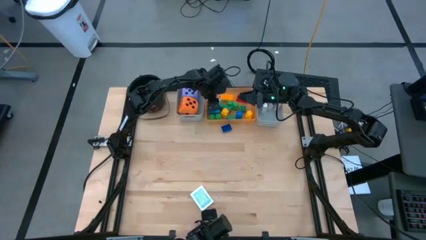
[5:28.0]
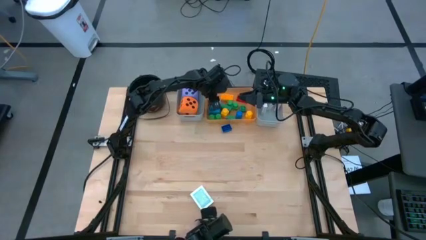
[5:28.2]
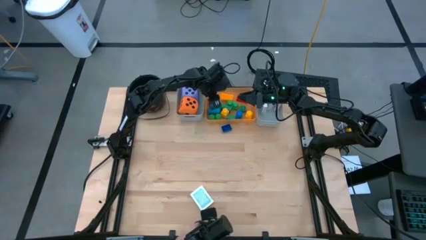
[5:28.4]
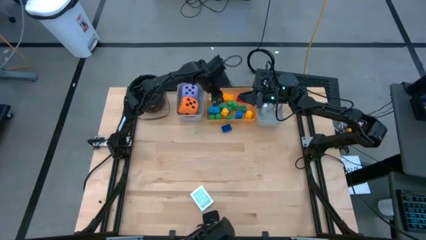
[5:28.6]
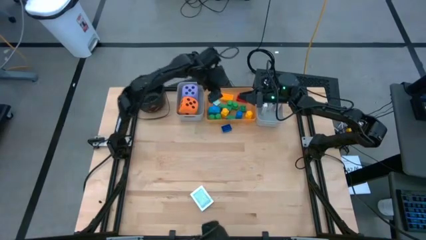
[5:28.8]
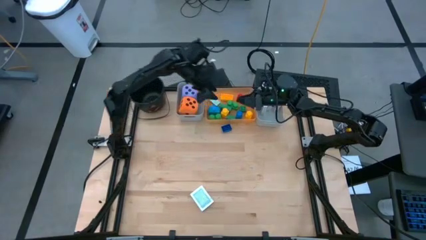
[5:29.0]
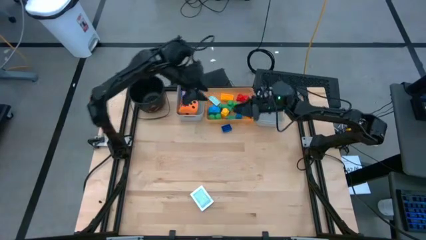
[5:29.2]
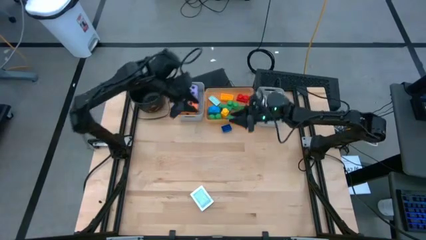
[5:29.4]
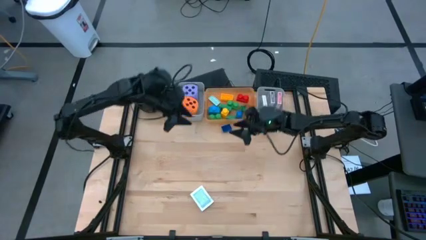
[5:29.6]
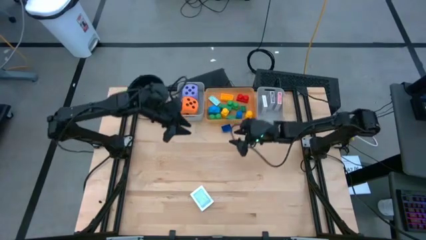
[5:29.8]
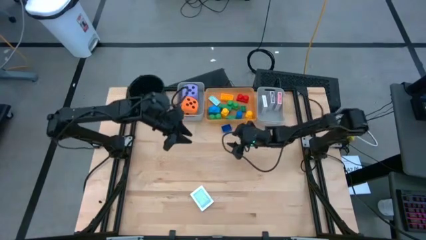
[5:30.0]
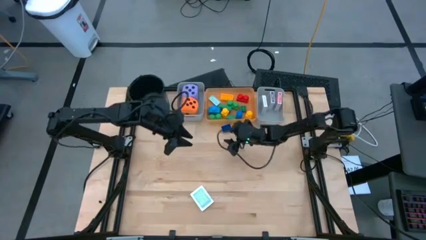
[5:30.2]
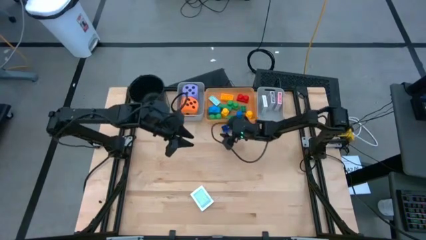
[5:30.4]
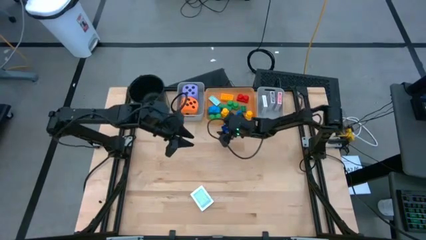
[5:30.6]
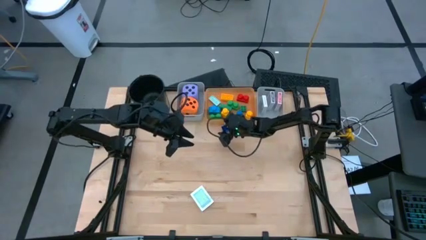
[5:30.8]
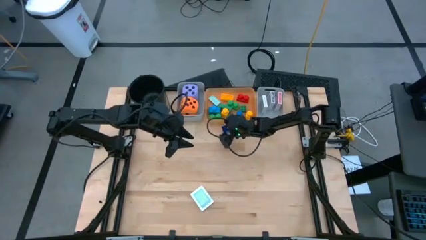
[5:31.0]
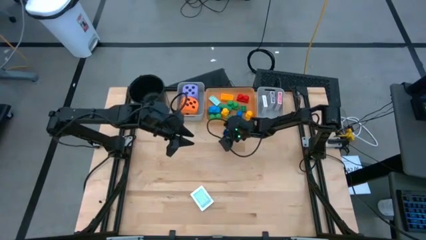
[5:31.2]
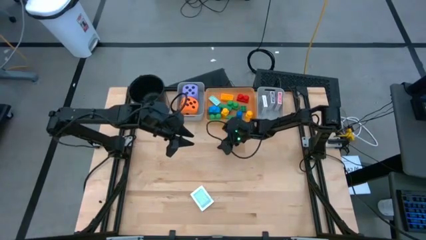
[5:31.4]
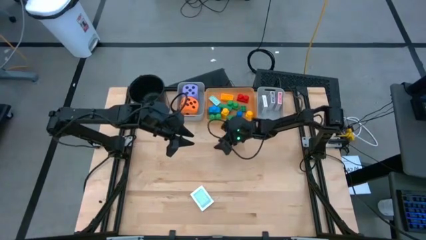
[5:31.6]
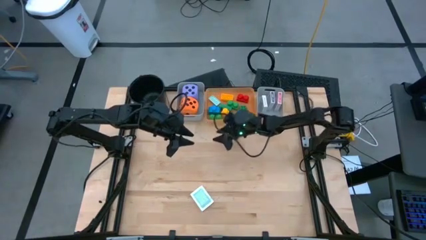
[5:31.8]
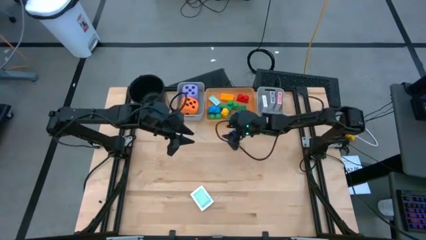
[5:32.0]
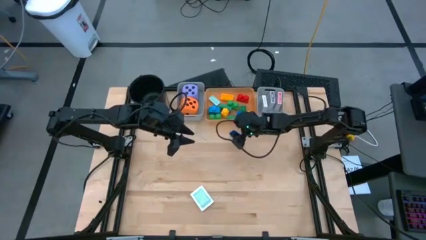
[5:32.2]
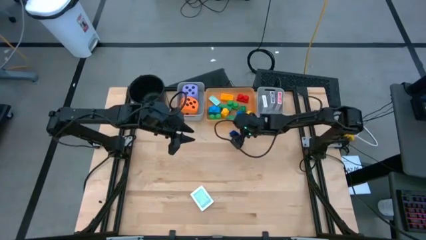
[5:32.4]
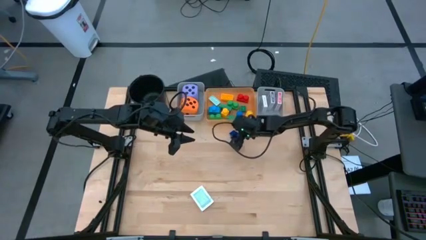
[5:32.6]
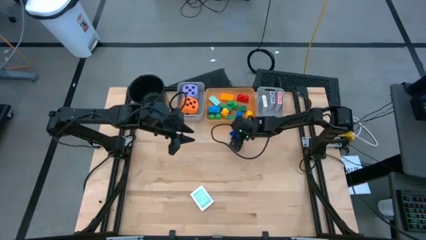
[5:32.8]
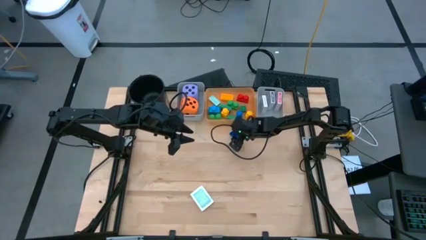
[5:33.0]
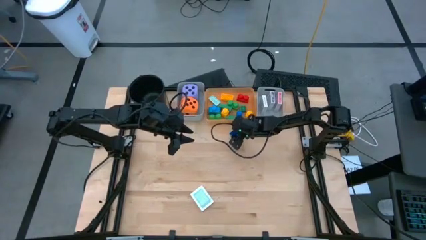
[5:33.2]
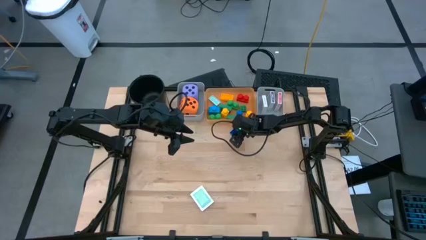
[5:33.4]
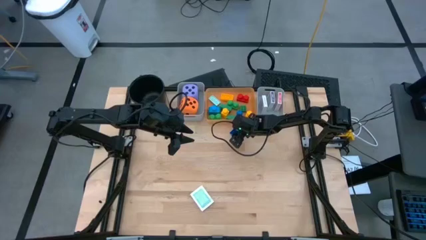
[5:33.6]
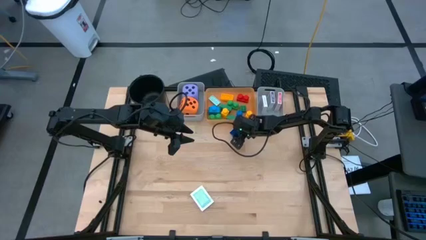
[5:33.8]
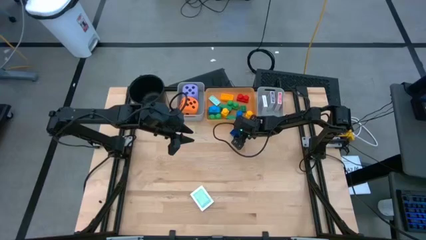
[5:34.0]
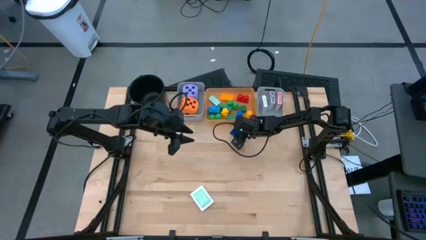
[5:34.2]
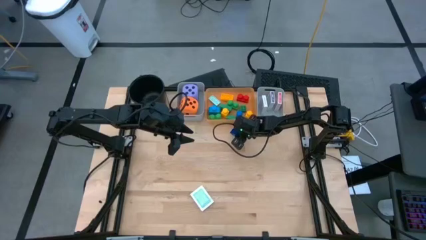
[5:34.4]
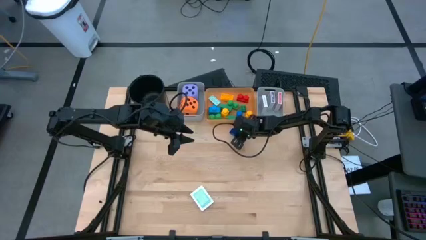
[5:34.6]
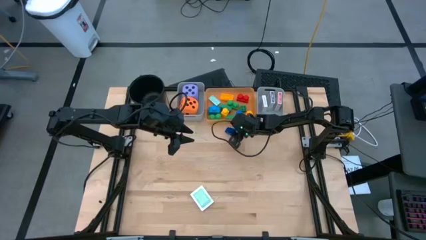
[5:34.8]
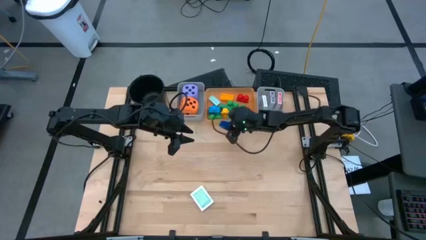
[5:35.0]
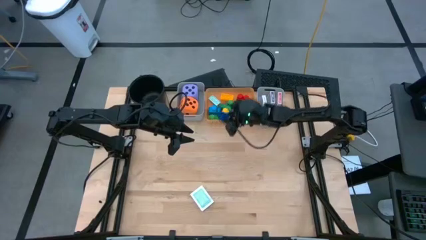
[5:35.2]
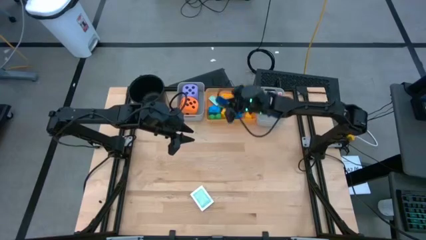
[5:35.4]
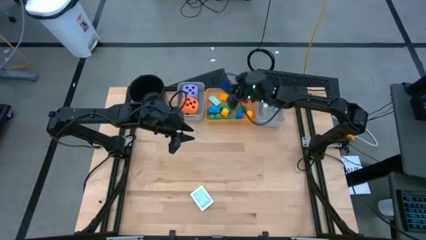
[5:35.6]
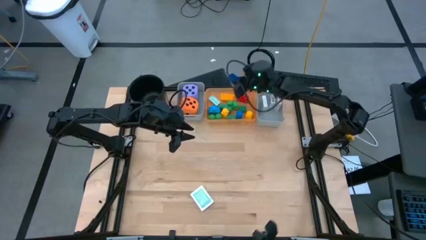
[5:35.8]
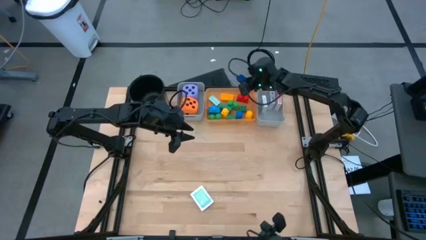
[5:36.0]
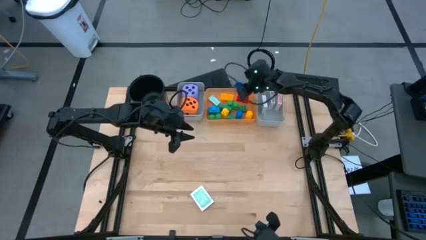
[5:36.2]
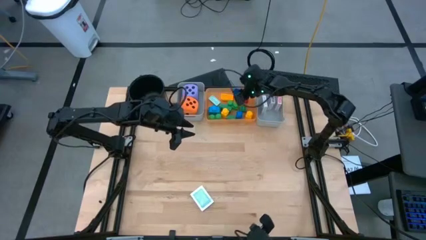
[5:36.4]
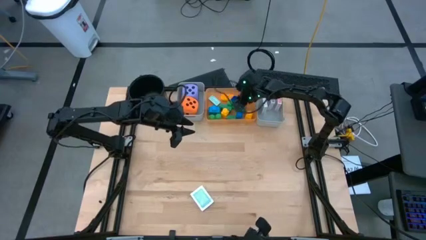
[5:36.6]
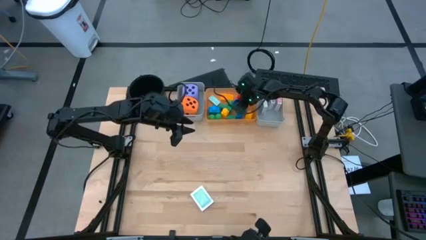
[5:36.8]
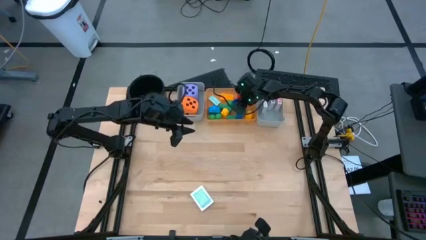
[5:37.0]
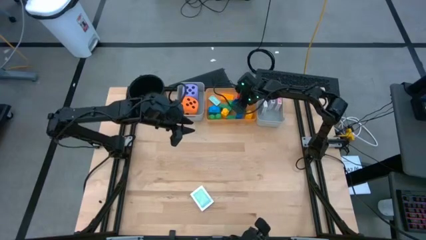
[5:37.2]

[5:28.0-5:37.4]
Task: Pick & Place Toys
Put the dark blue game piece into the orange bin
